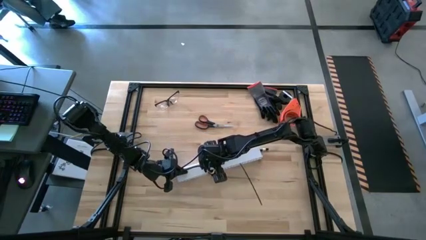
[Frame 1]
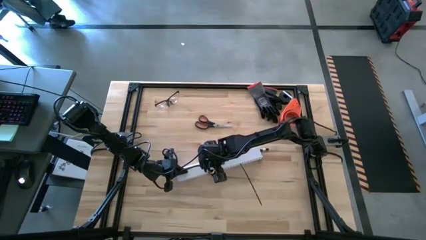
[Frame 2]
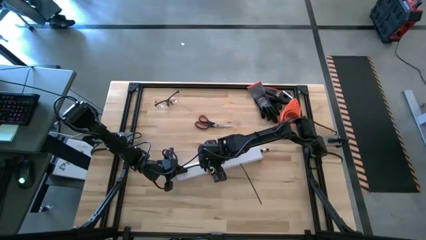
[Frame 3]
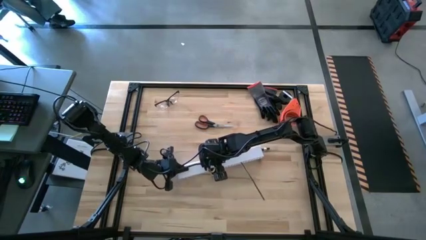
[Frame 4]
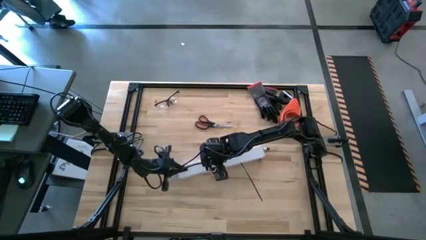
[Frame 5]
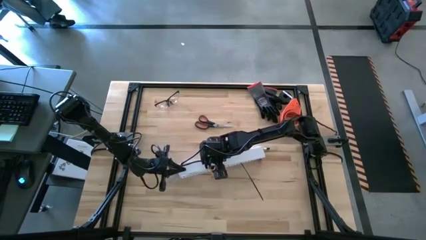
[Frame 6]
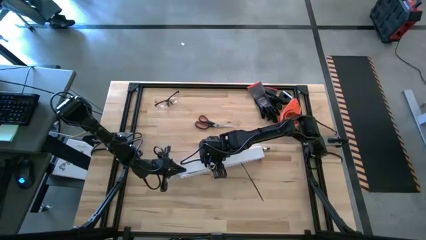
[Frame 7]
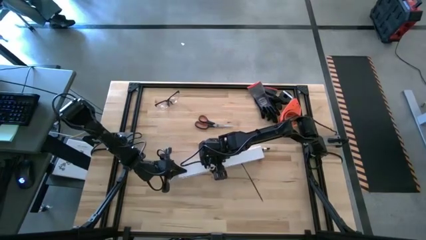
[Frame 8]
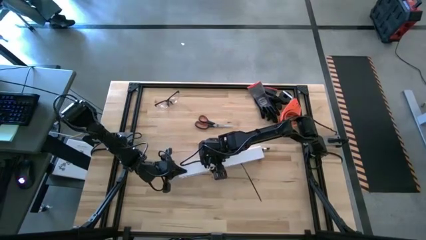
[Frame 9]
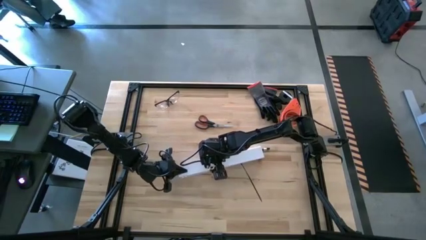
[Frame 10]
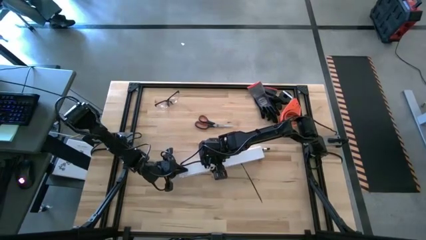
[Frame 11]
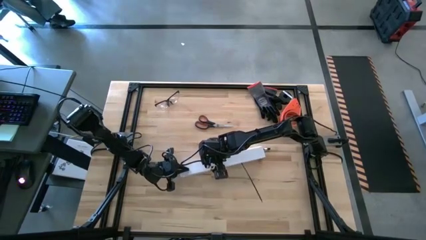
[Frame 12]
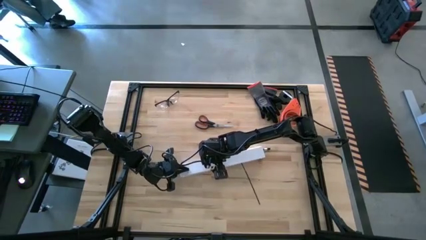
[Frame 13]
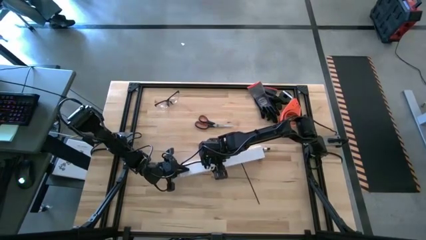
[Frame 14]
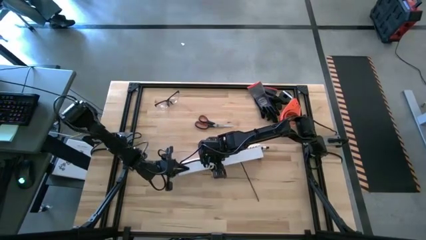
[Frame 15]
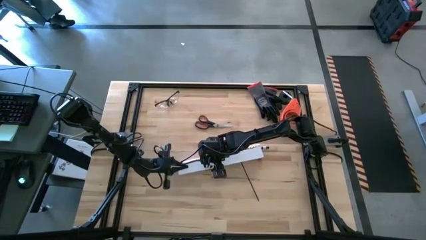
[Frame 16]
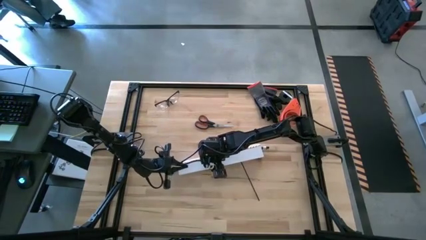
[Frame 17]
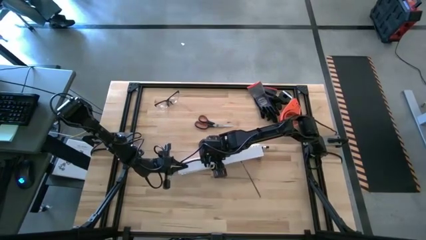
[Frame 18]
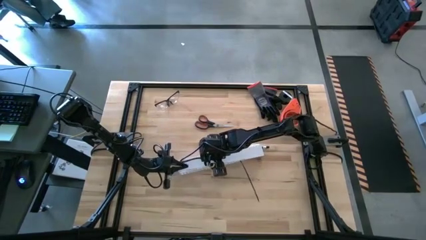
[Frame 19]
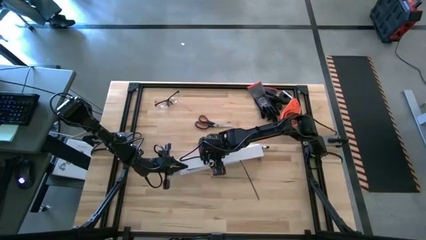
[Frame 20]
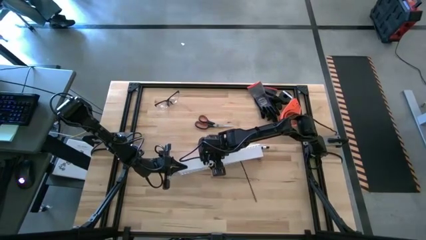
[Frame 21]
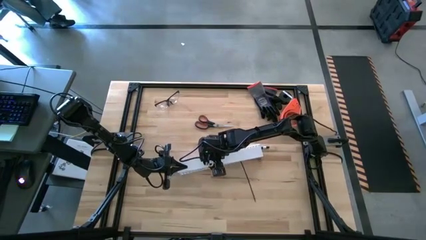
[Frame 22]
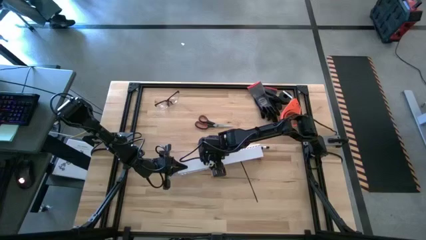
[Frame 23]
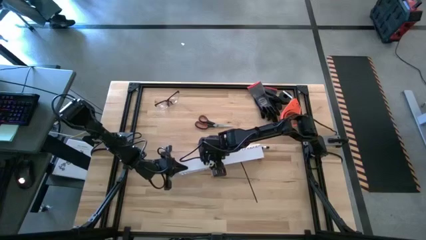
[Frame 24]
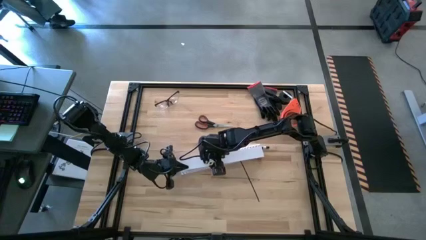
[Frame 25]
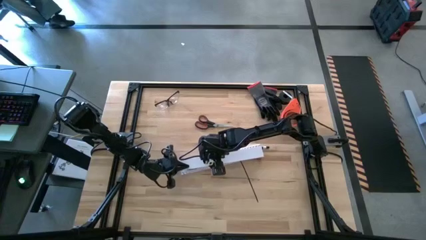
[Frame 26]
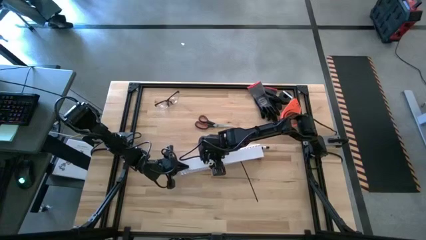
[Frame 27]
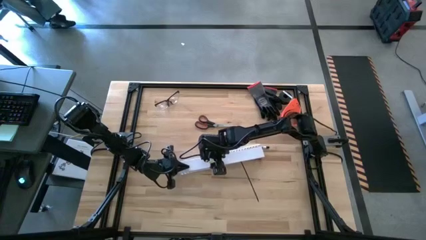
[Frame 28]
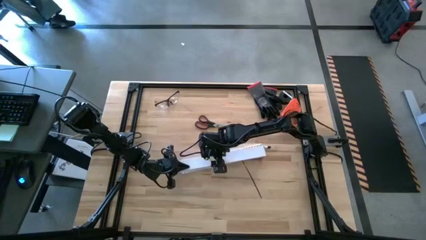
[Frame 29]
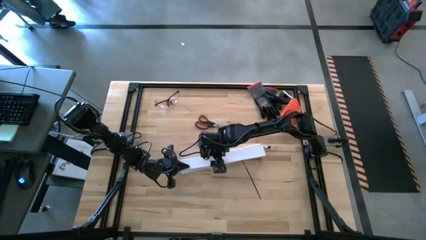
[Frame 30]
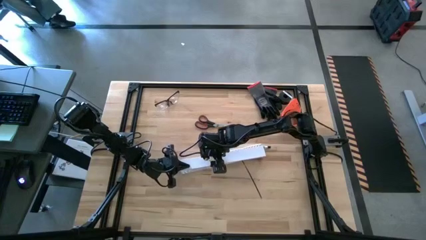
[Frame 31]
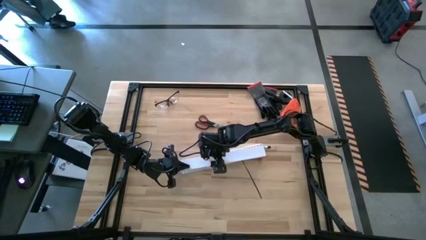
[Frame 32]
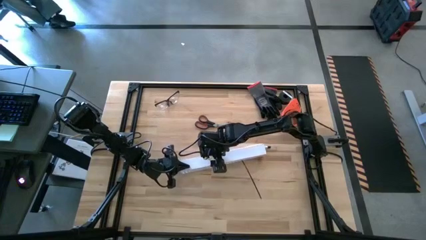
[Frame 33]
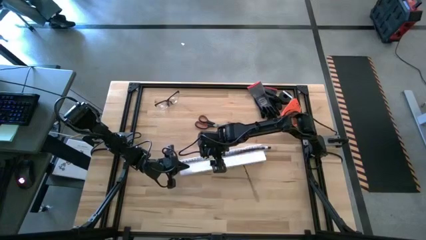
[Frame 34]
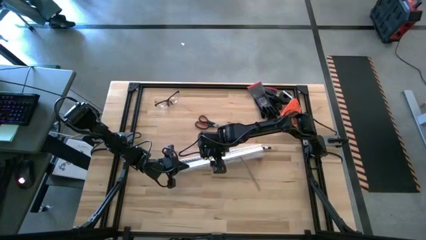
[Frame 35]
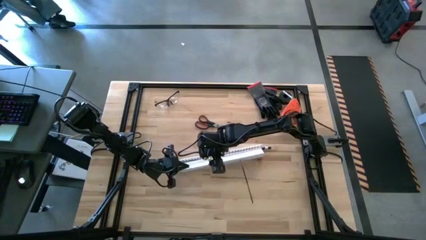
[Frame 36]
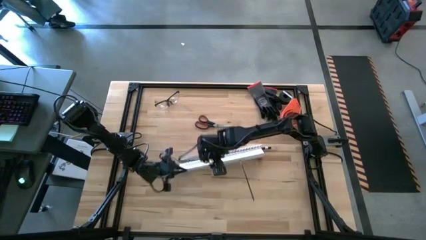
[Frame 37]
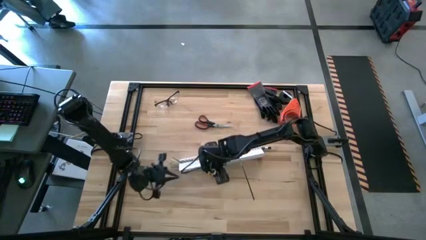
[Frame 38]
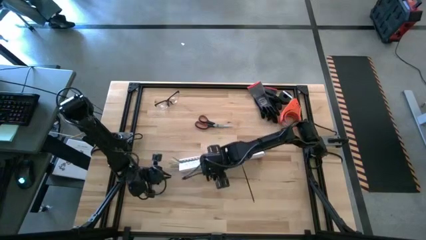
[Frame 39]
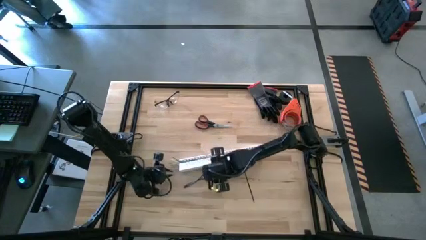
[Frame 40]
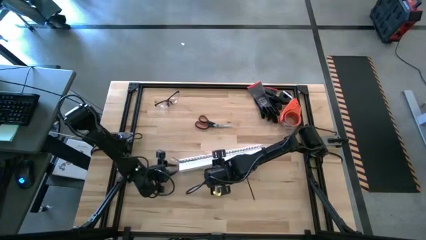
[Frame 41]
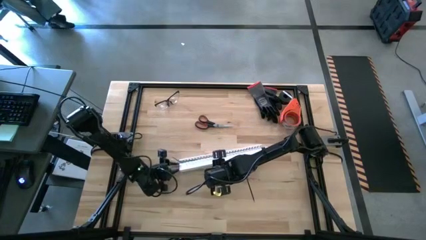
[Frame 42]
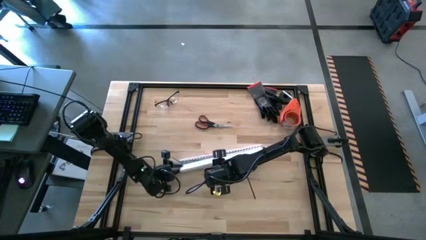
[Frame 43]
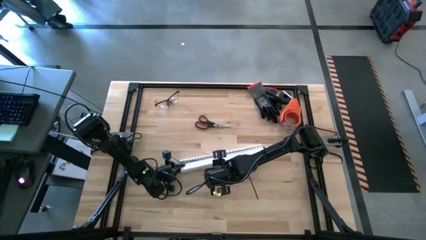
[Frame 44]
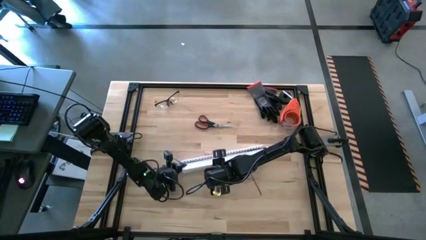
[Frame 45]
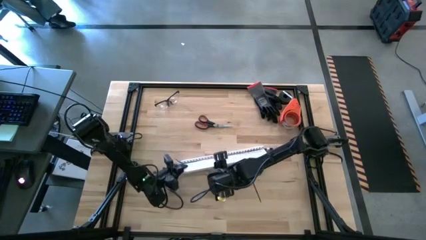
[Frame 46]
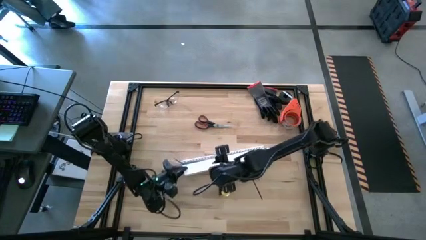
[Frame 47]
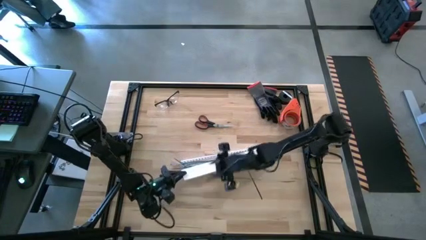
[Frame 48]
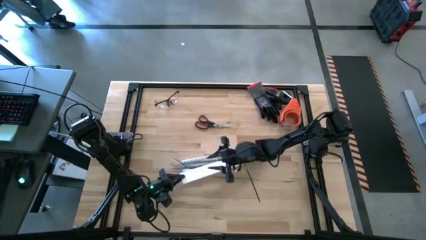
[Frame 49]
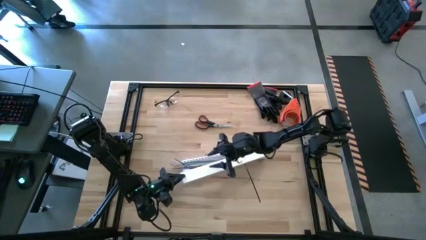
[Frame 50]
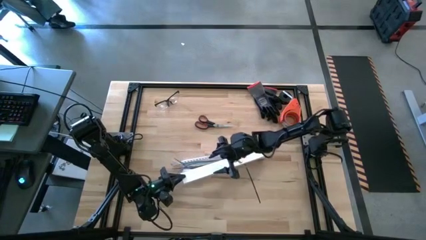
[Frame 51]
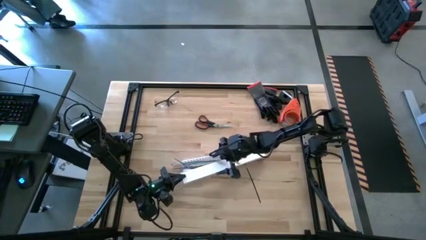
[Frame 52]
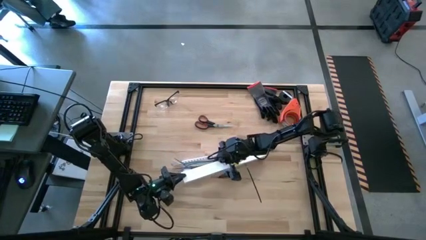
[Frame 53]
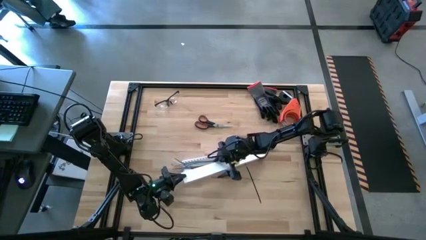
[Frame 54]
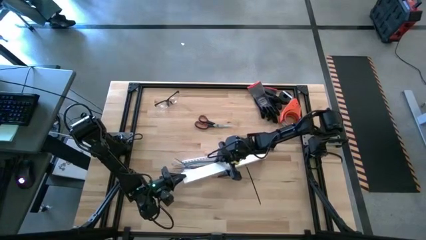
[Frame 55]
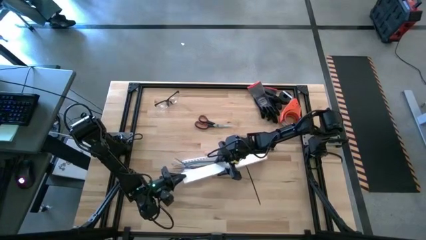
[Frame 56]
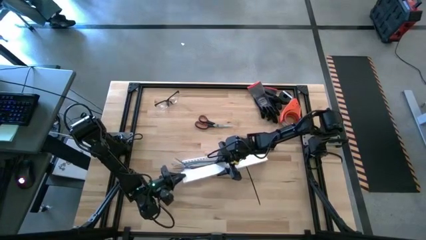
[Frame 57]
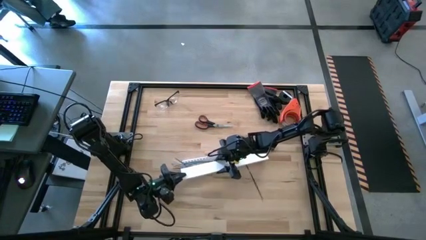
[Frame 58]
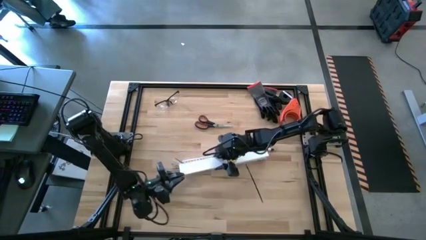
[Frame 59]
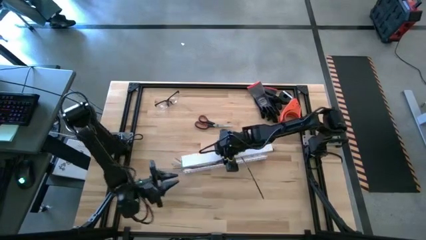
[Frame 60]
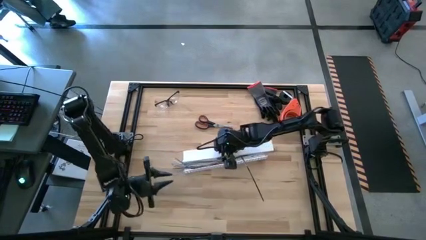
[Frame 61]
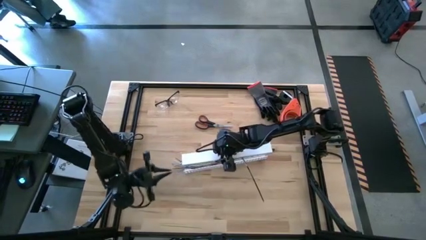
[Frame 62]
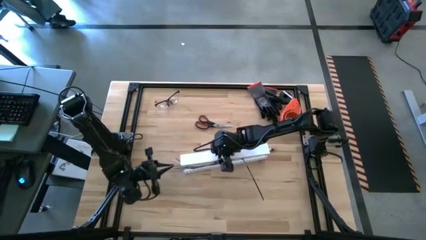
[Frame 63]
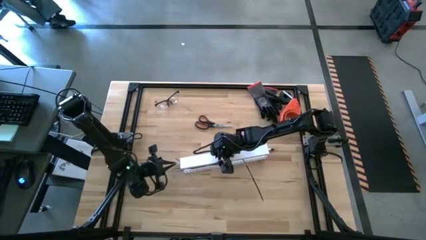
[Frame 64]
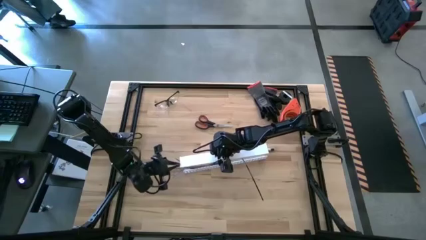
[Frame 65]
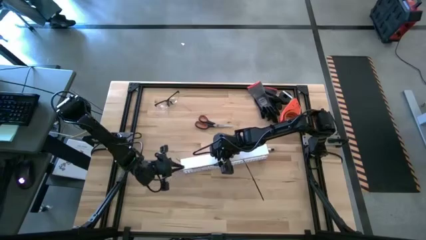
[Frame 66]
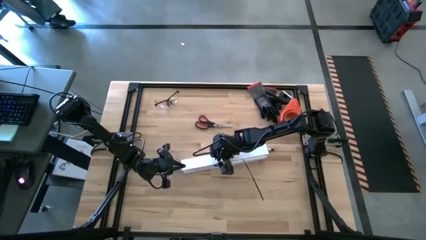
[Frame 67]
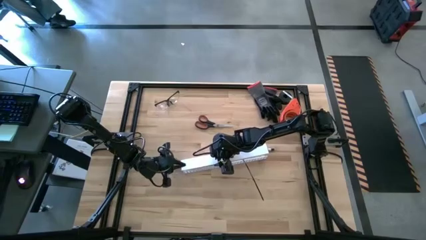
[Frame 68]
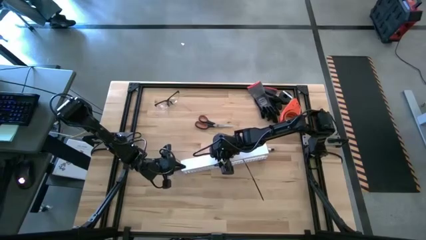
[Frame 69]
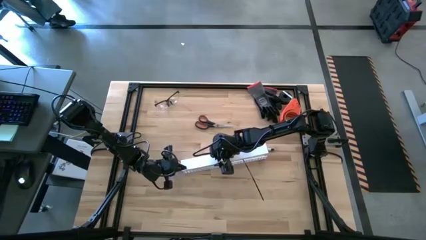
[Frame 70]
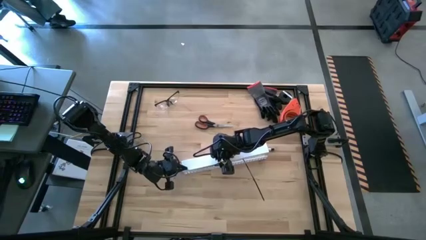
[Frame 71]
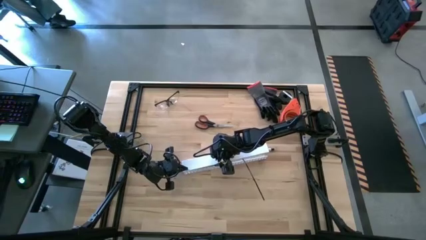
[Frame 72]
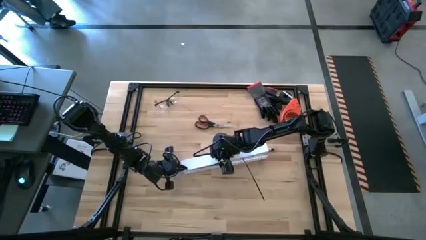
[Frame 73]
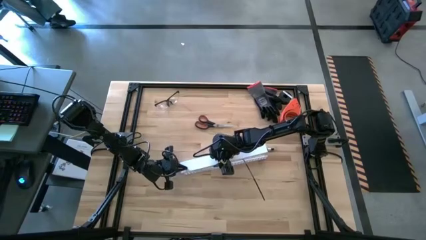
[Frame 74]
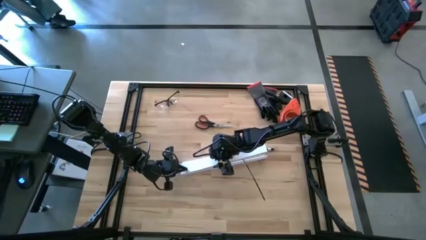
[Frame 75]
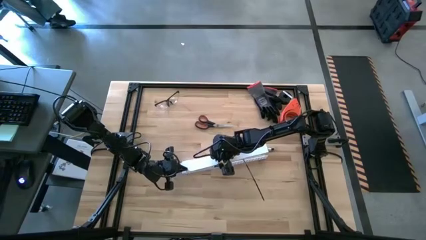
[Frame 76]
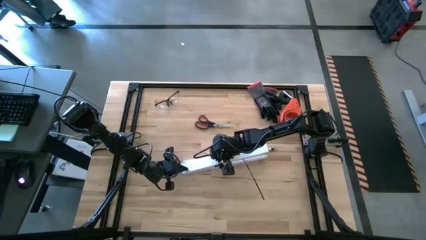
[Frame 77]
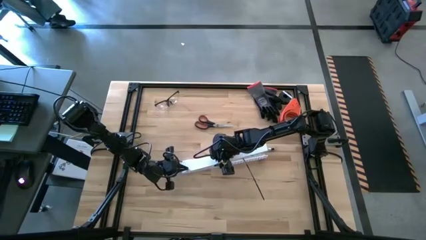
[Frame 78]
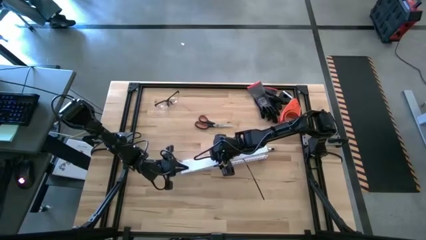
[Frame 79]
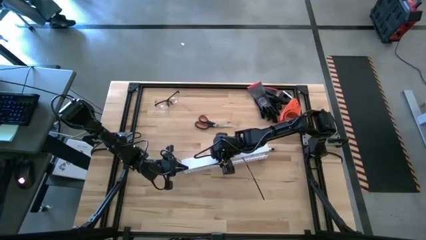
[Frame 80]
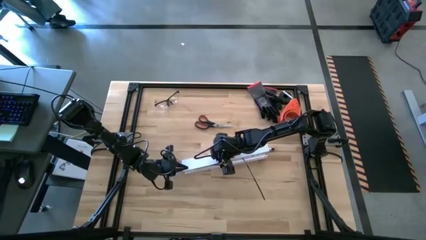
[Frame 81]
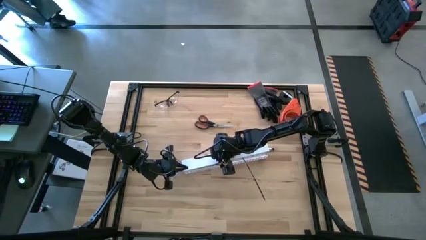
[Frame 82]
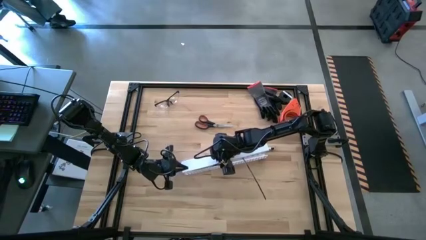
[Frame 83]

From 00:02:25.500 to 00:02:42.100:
Task: Ziptie cables
Close the white cable duct lid
